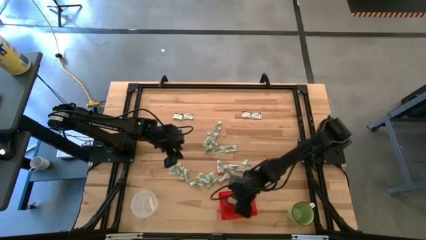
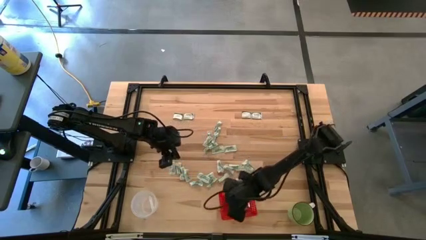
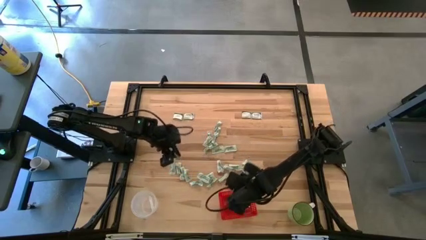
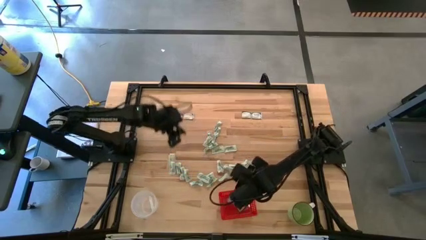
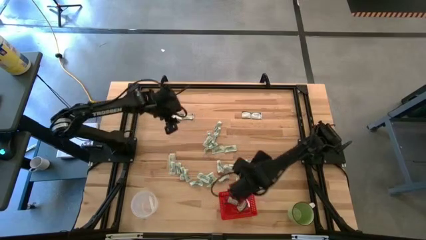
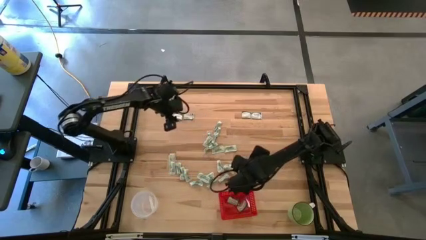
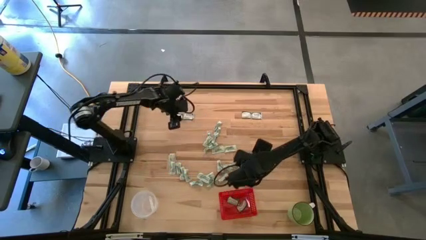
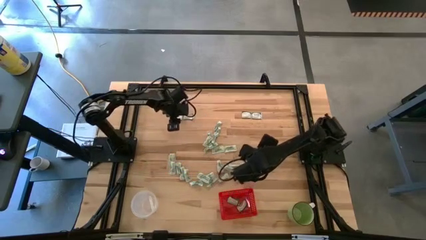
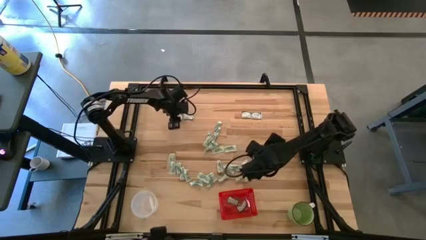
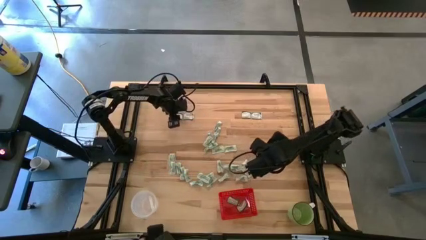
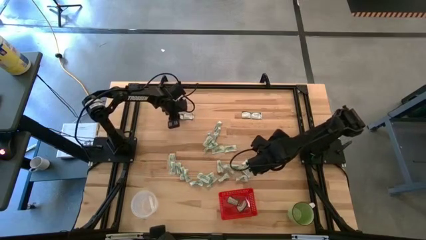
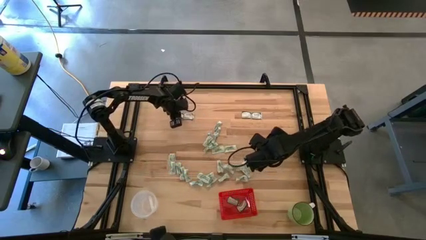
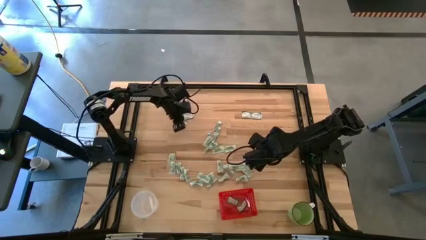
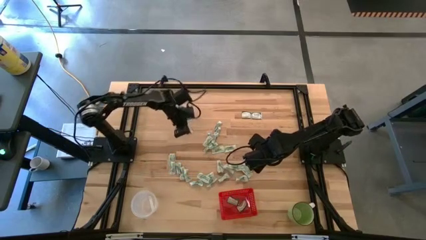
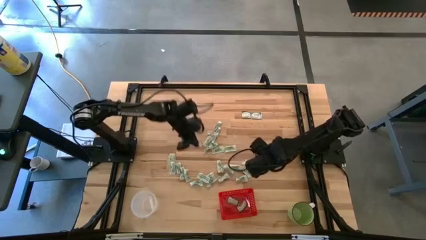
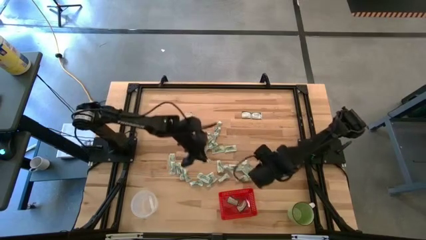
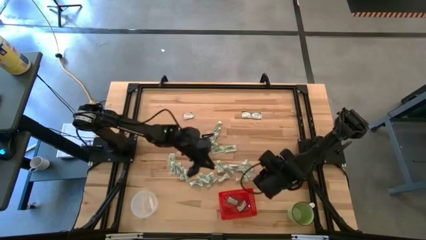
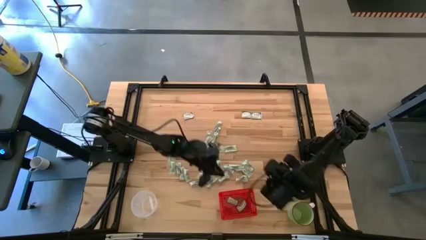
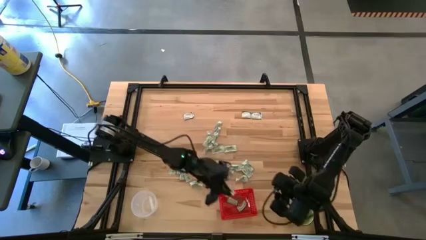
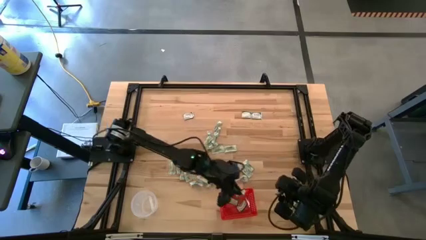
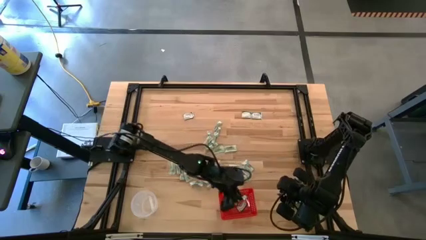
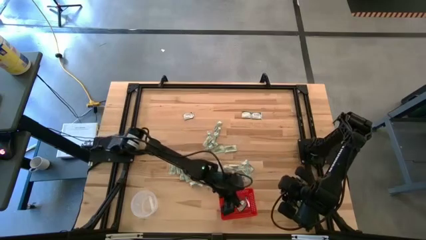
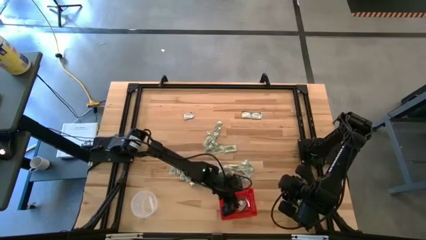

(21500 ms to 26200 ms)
Task: Pick and place items into bin
Put the green stevia packet into the red bin

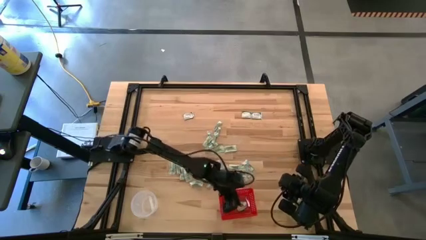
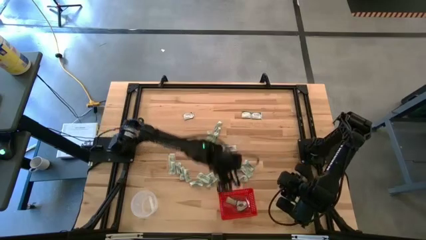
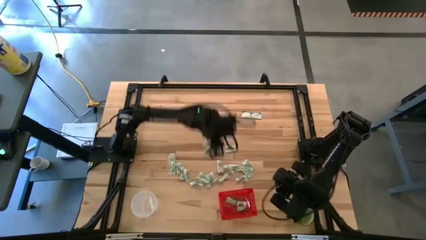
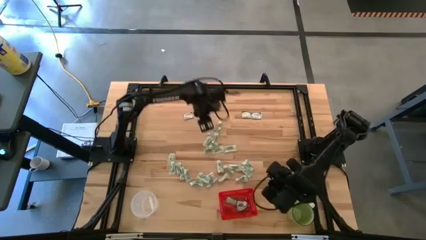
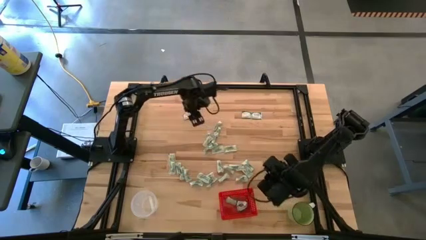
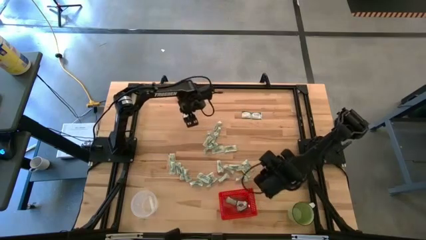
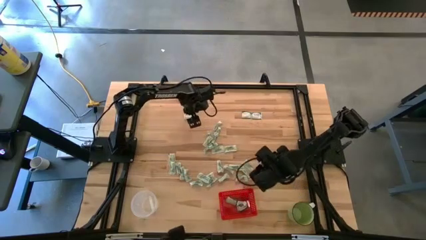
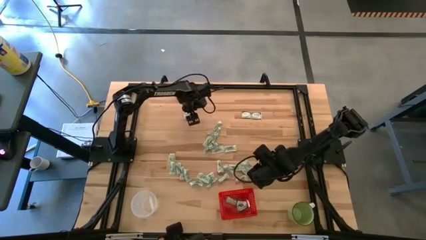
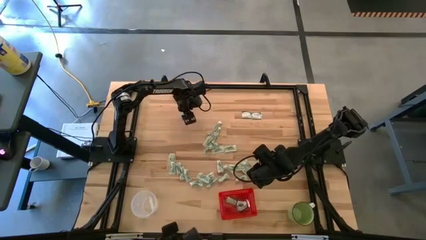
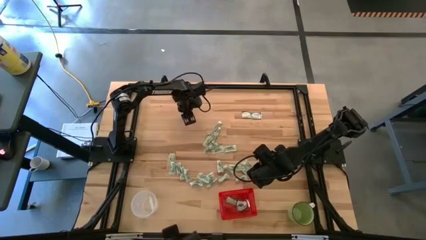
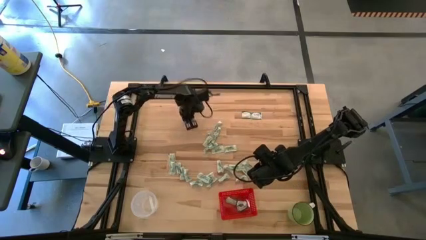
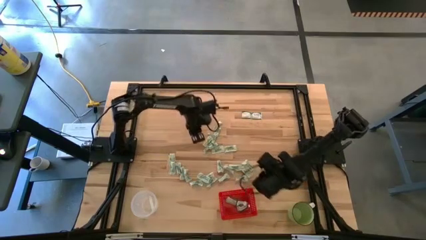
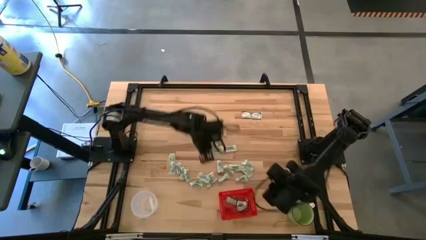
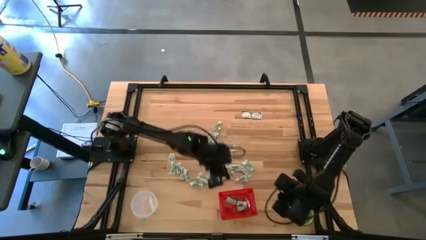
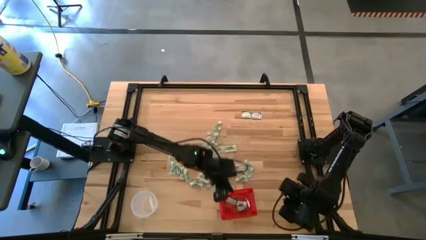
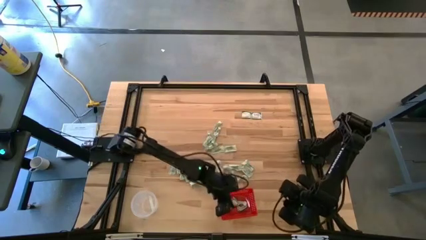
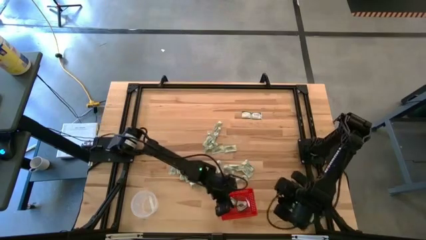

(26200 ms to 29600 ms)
Put the left green stevia packet into the red bin

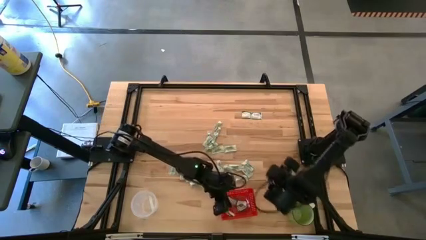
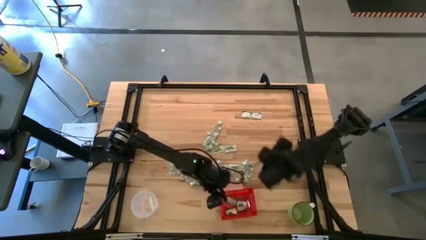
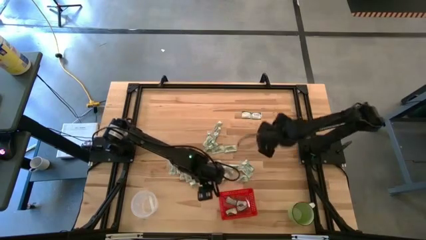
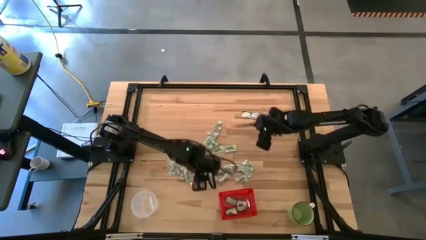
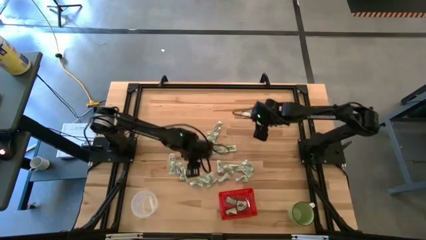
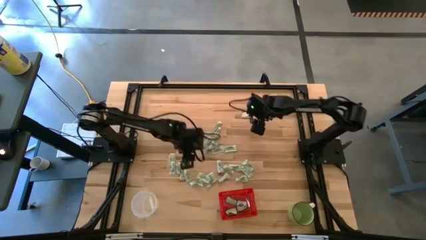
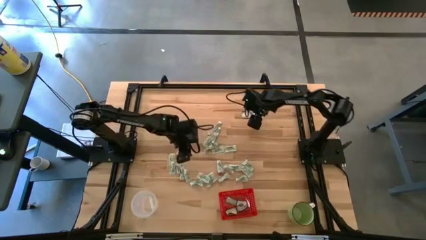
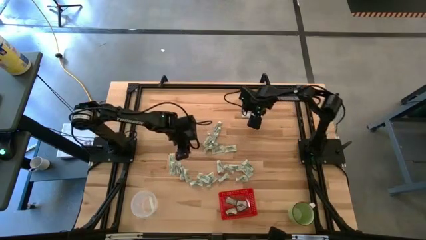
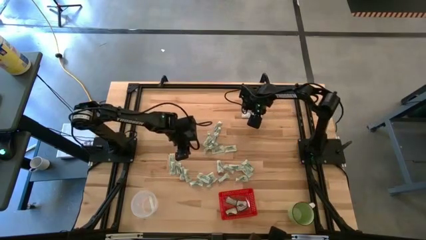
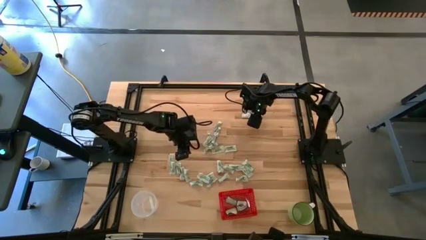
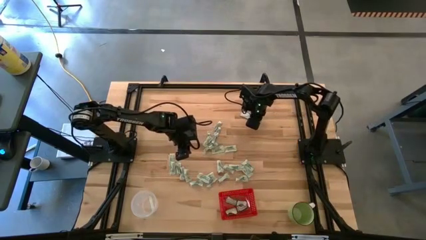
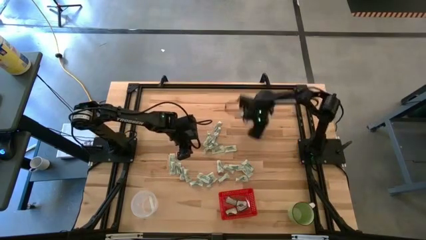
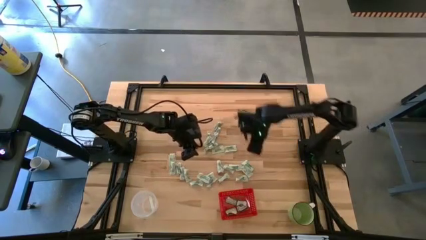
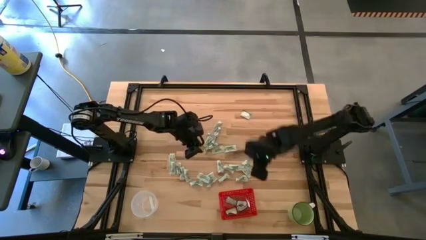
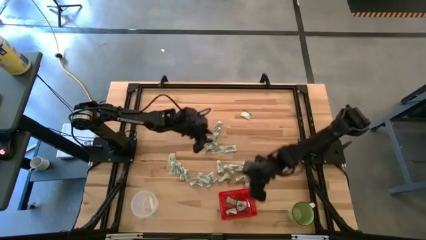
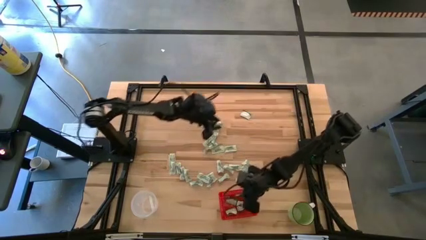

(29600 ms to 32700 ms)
Put the right green stevia packet into the red bin

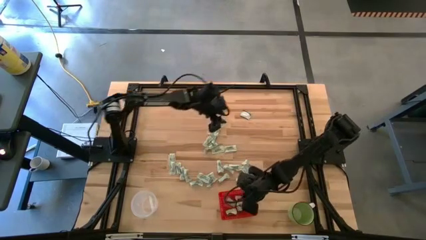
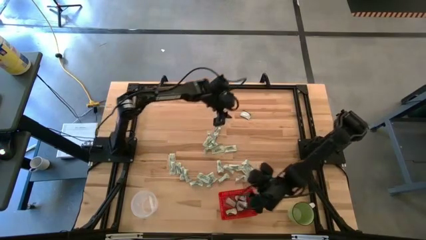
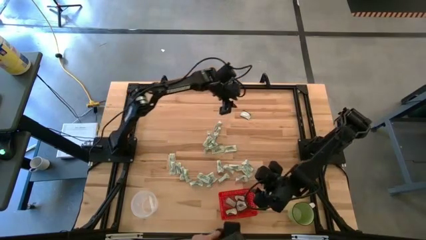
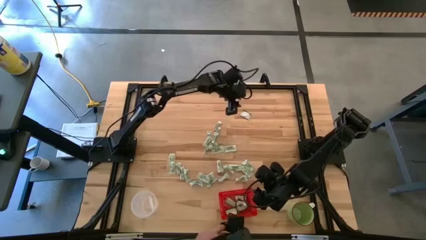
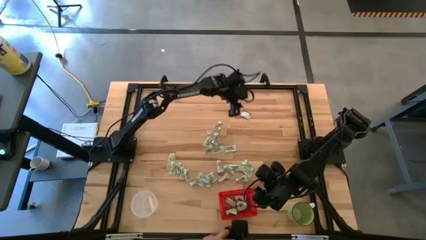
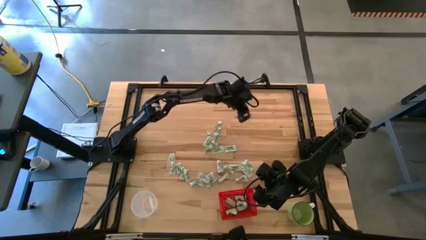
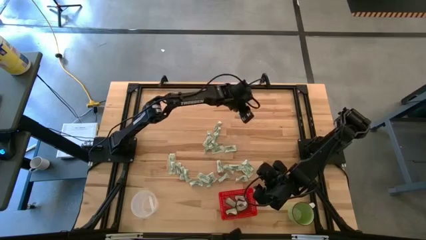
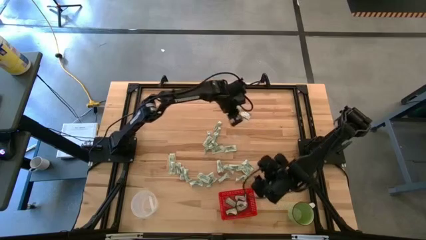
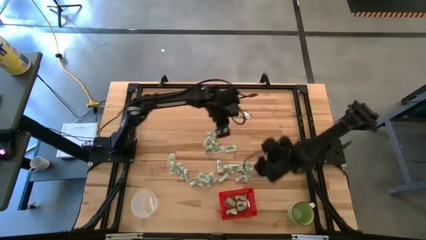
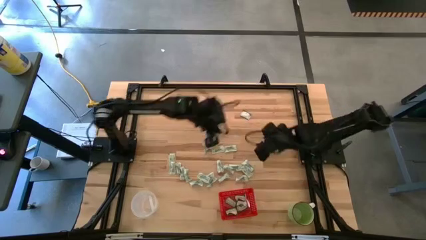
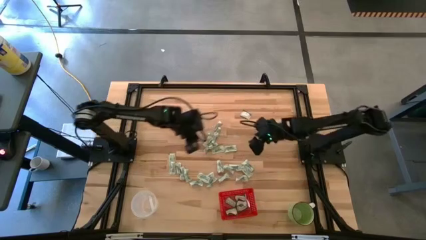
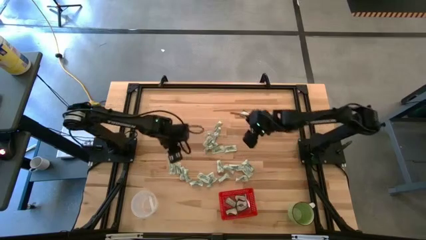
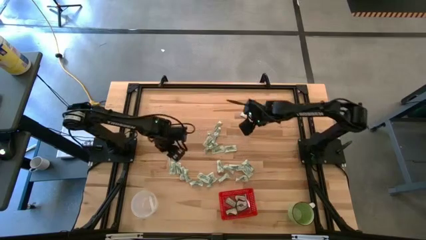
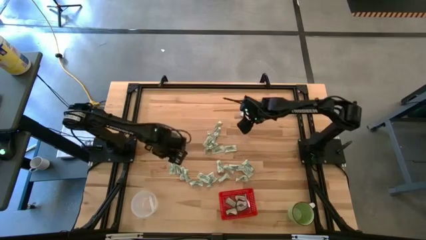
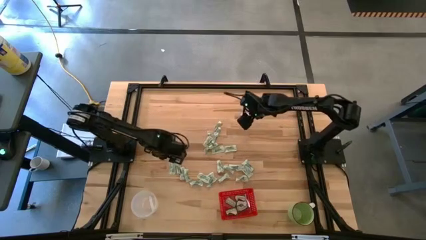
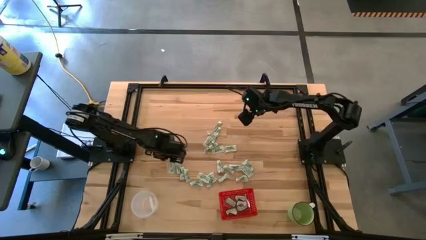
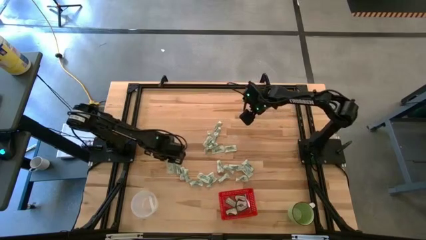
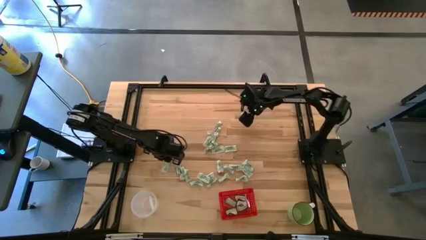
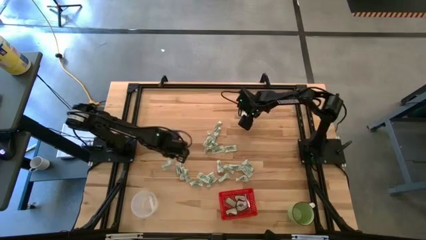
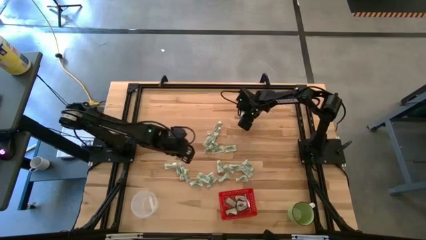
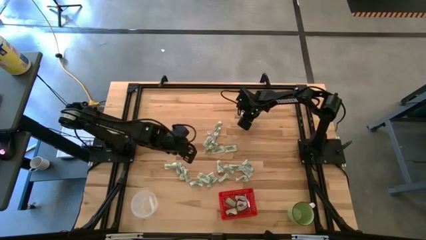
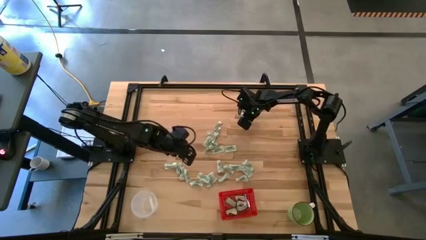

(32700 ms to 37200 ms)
Put the white stevia packet into the red bin

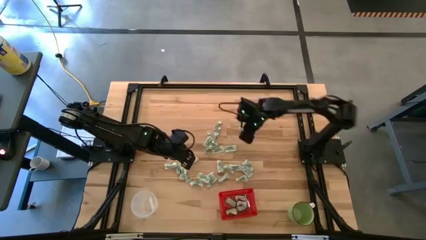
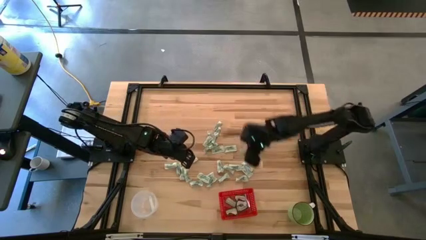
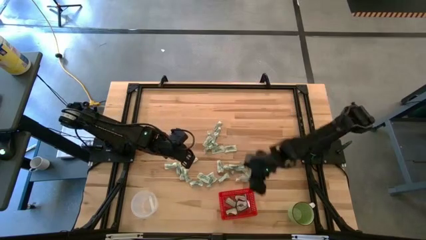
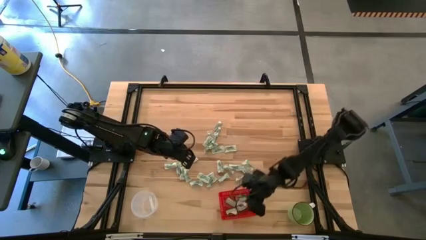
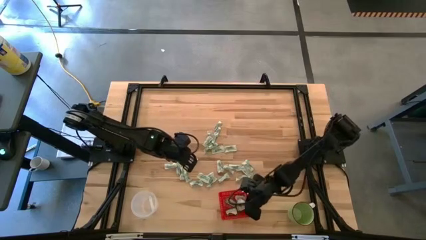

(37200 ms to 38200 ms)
Put the green stevia packet into the red bin

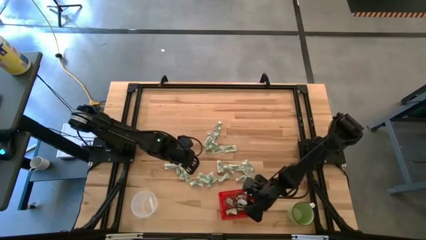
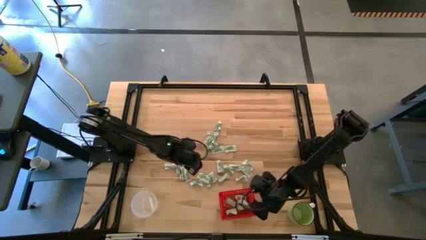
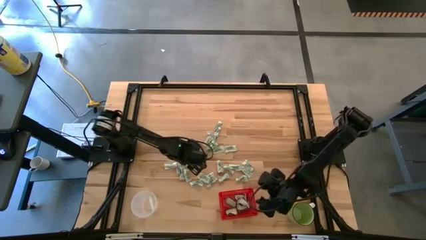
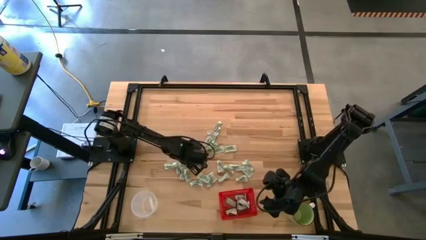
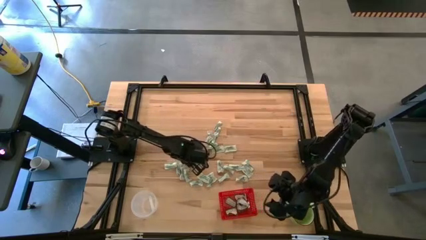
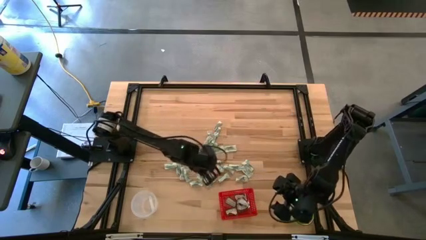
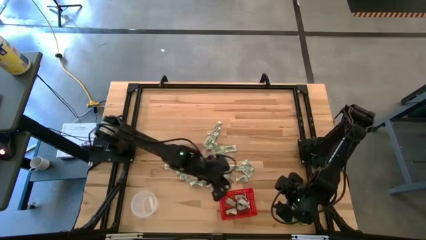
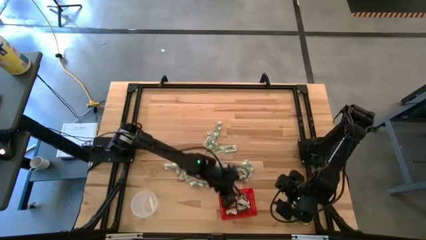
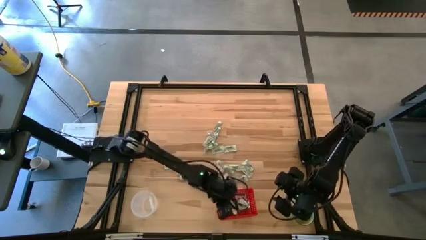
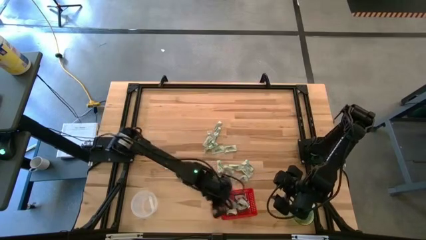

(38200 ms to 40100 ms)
Put the white stevia packet into the red bin
